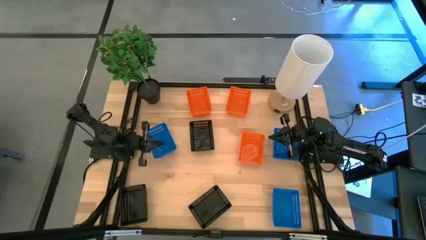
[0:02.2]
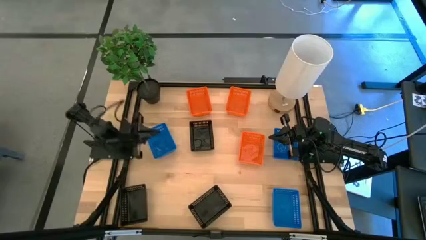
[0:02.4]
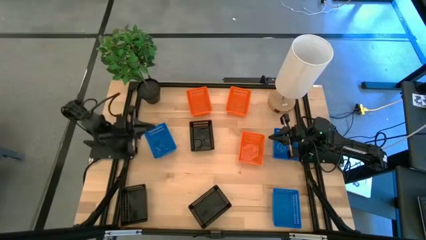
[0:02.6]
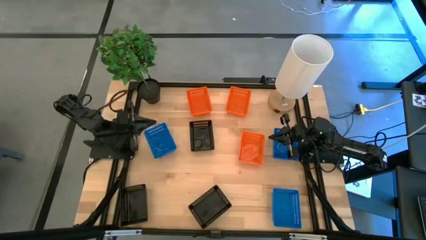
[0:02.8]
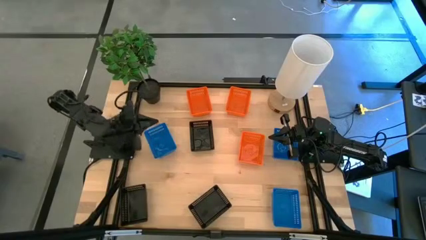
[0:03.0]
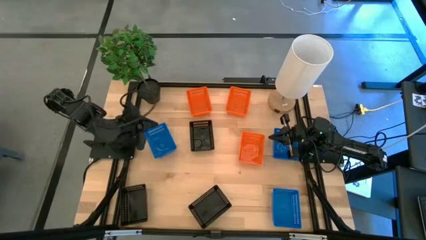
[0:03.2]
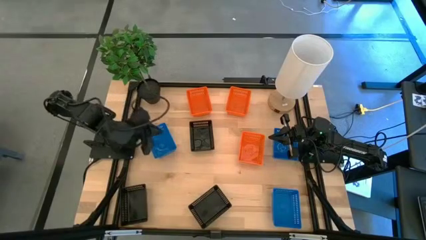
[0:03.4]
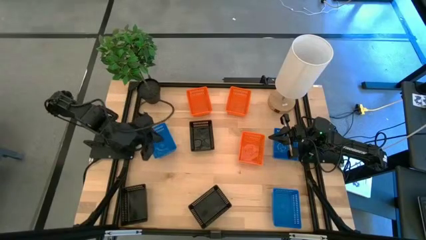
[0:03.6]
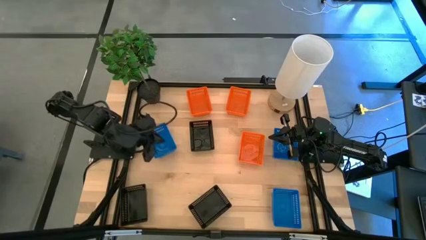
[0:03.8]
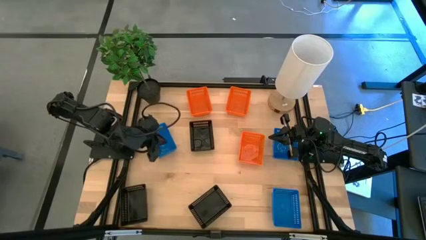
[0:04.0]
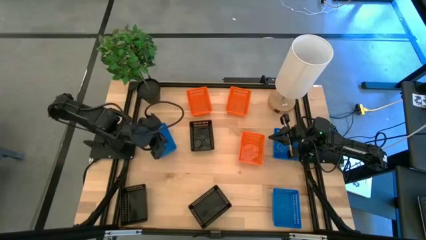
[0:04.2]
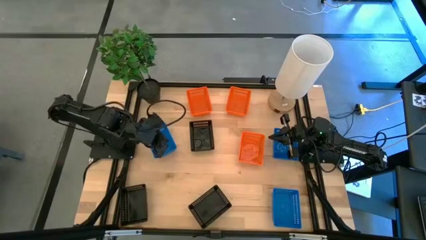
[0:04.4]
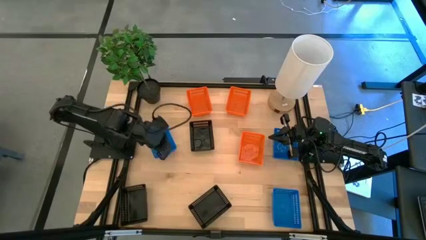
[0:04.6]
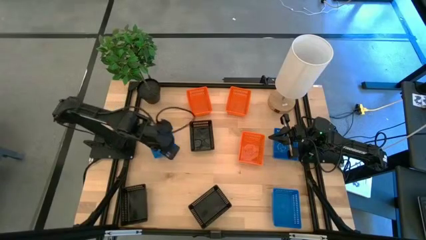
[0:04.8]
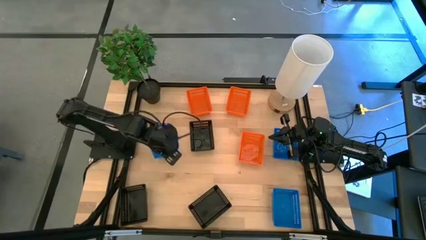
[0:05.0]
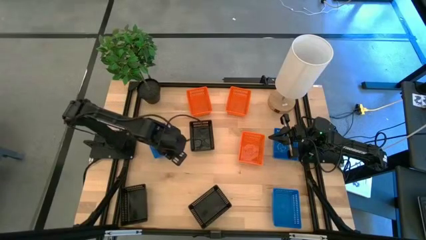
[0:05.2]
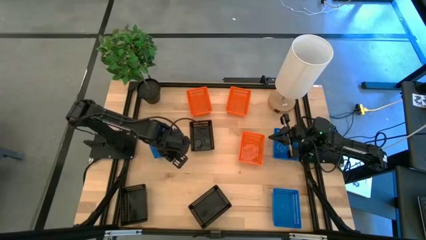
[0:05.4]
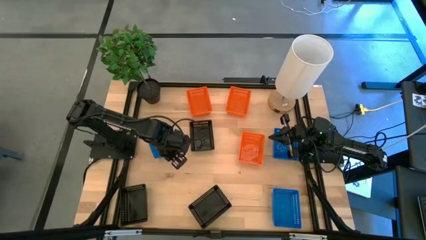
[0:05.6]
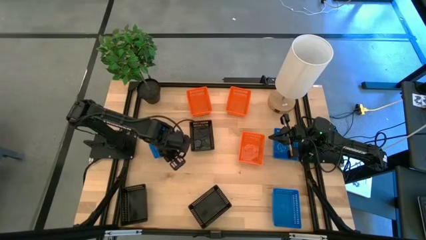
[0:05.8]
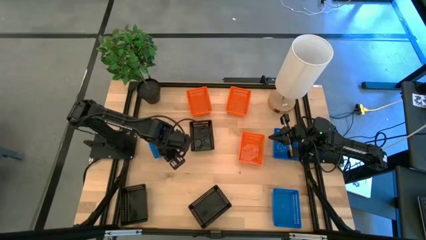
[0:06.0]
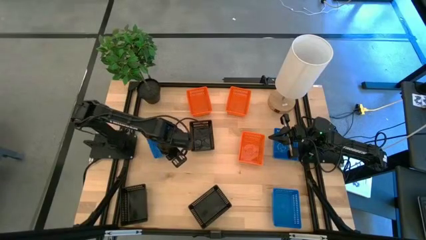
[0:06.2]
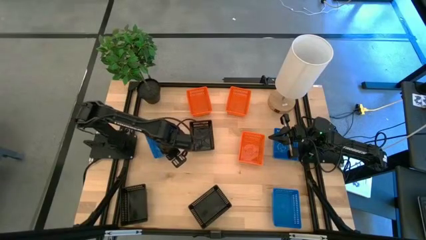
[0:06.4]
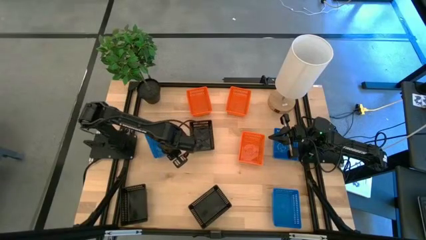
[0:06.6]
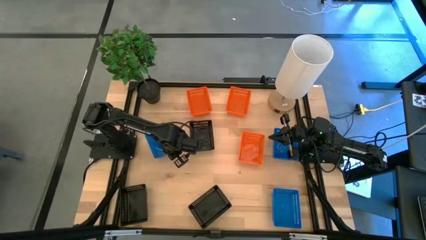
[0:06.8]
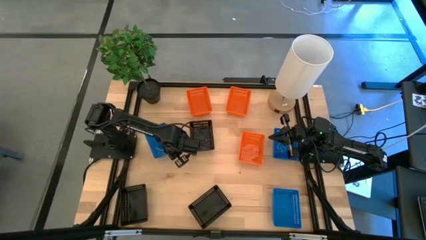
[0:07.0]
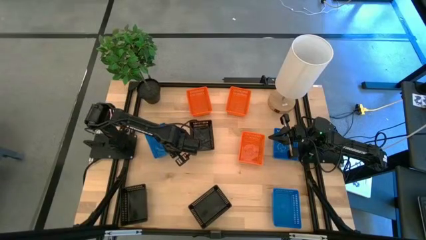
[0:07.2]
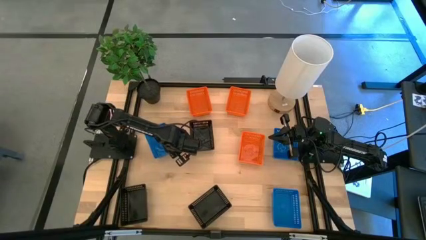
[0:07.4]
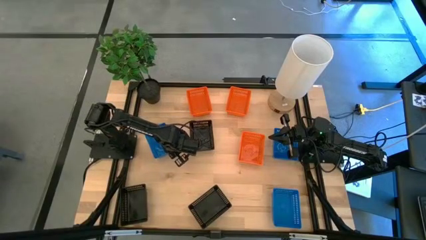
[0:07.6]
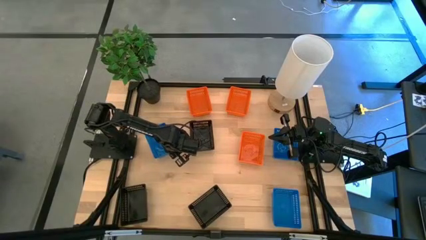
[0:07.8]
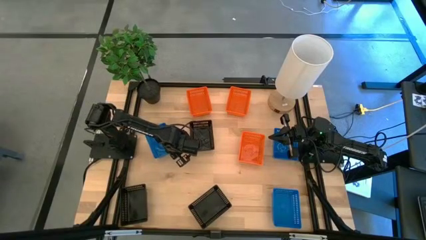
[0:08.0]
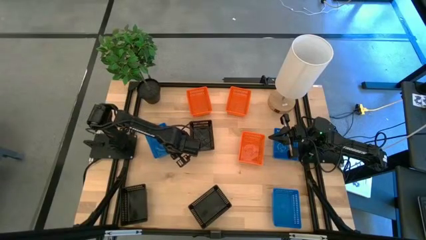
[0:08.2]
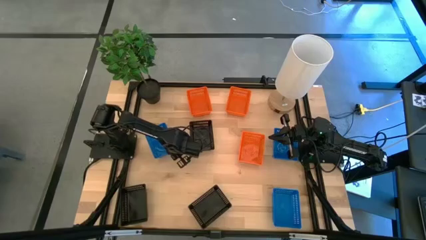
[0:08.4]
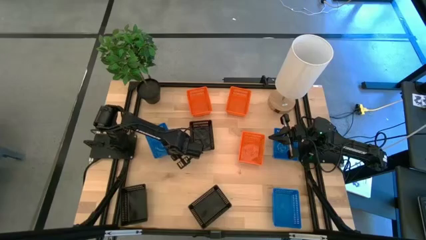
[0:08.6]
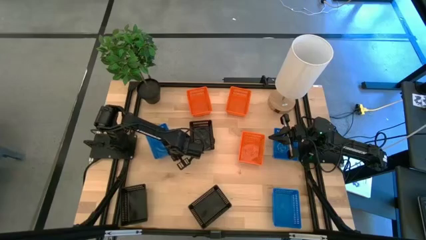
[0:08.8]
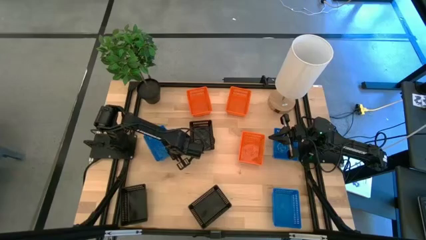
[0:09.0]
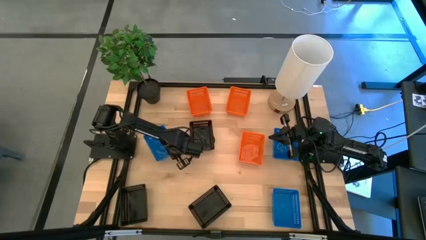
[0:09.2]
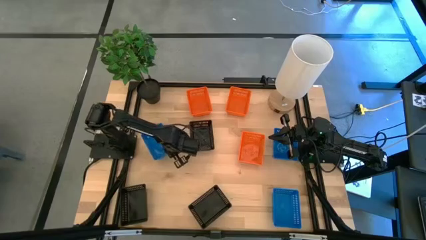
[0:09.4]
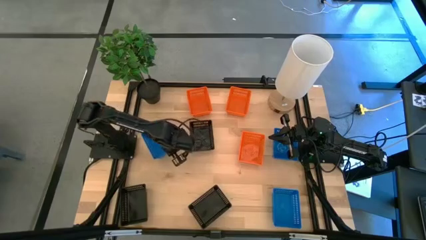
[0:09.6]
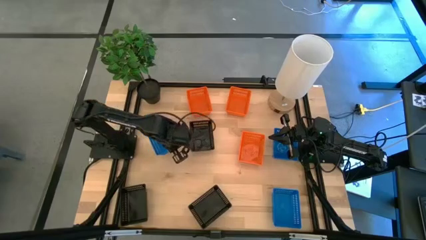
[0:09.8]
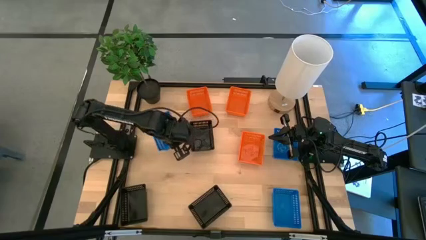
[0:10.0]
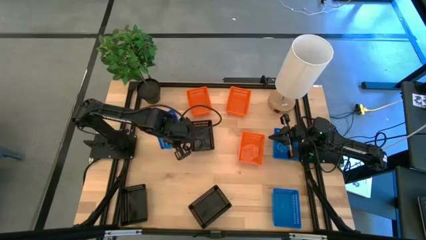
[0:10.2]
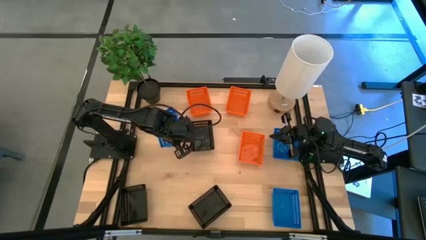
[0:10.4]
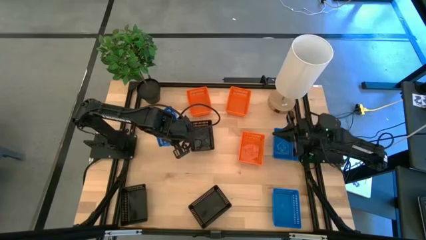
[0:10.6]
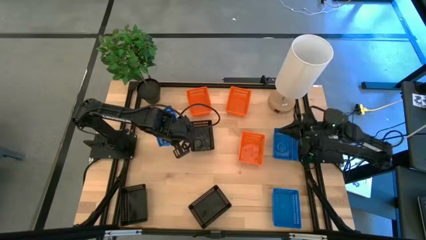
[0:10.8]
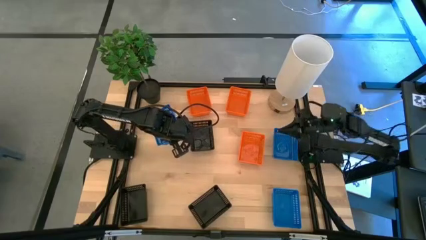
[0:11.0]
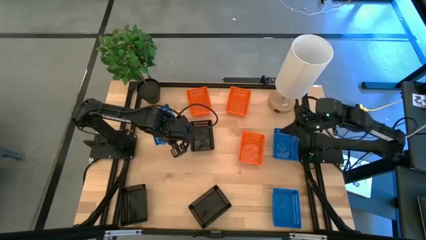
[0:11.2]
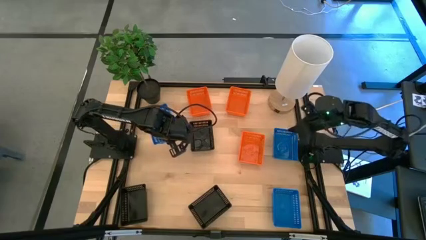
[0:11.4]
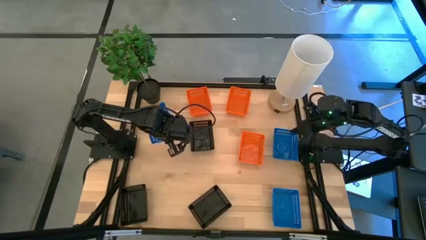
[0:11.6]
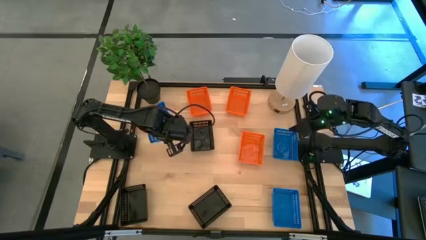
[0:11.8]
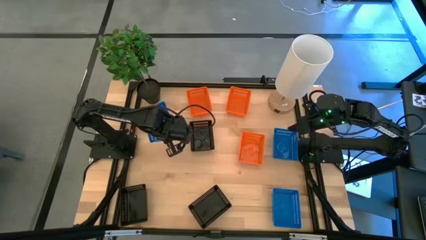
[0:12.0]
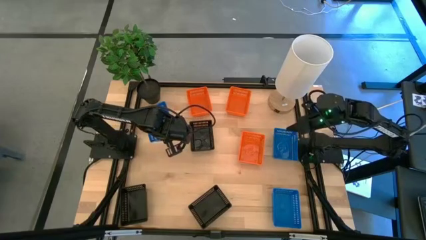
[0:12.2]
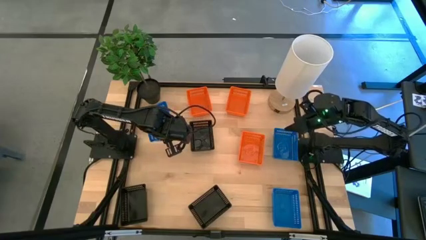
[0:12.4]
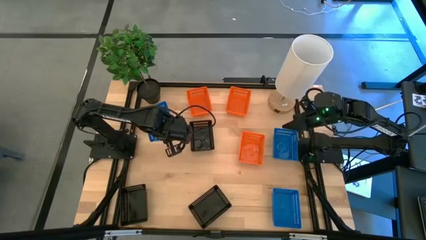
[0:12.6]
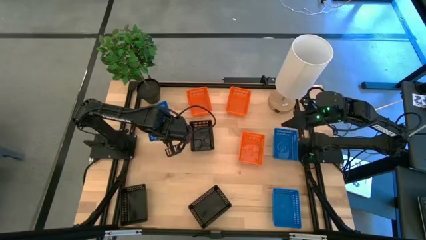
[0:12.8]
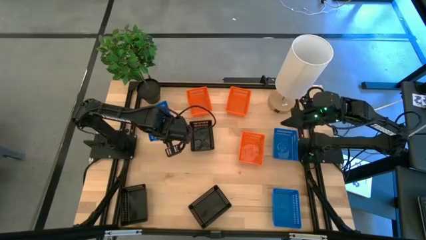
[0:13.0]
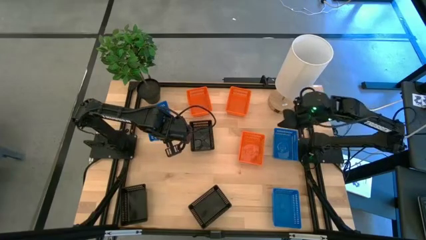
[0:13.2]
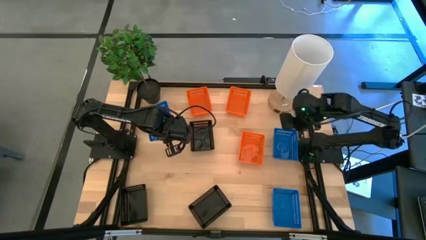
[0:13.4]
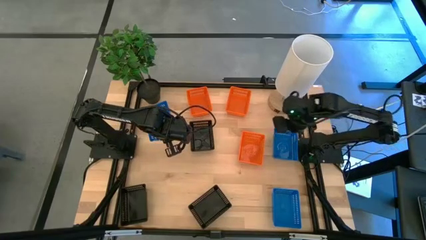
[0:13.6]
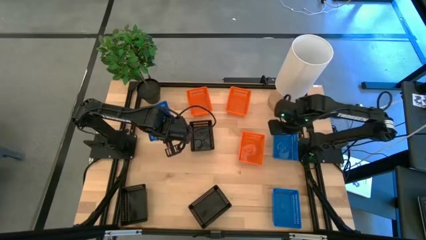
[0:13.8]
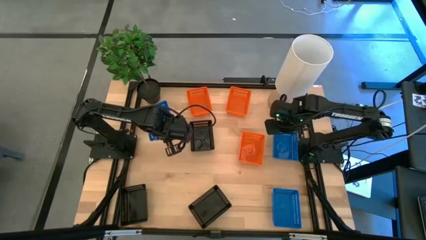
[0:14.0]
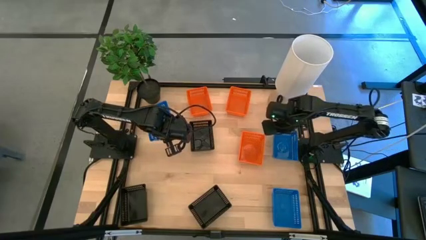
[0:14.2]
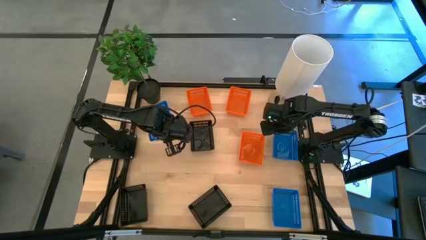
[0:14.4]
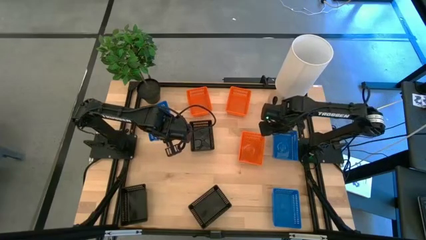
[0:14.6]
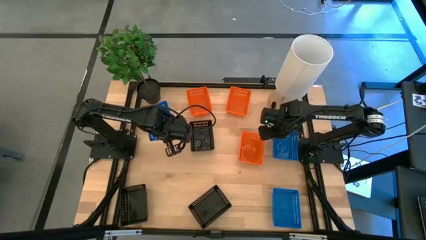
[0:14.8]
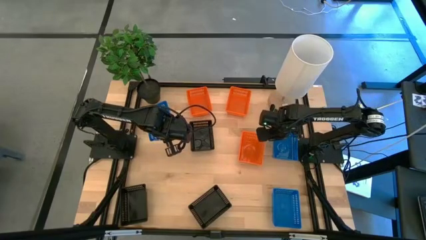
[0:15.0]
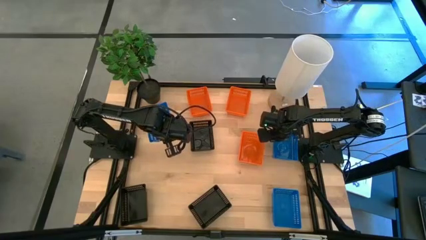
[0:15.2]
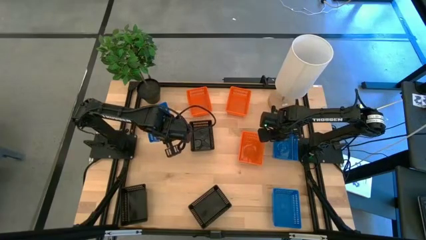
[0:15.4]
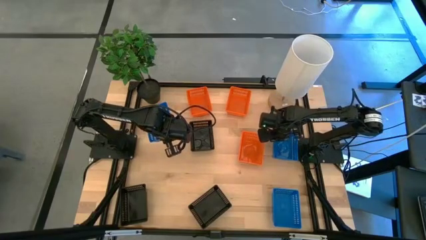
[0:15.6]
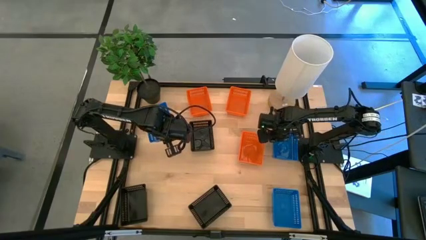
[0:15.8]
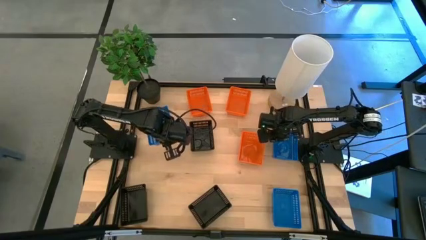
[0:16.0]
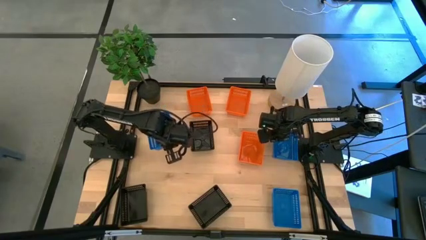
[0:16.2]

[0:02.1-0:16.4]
Stack the top right blue bin on top of the top left blue bin
